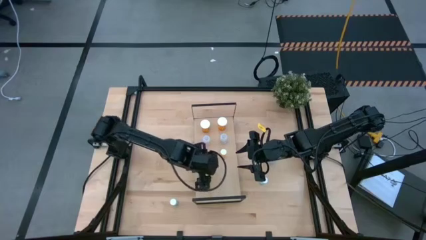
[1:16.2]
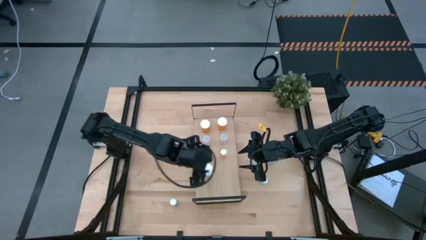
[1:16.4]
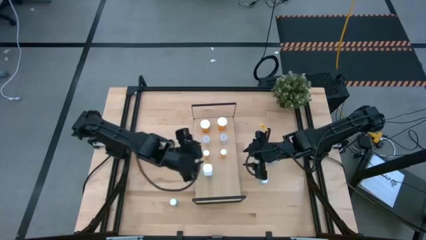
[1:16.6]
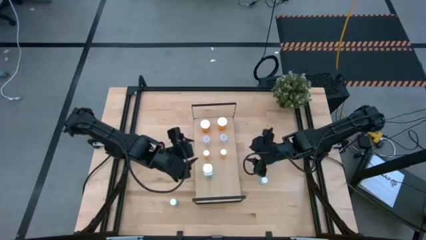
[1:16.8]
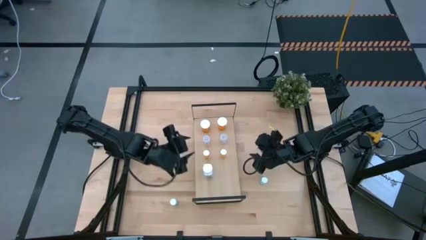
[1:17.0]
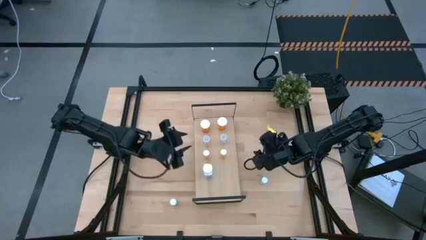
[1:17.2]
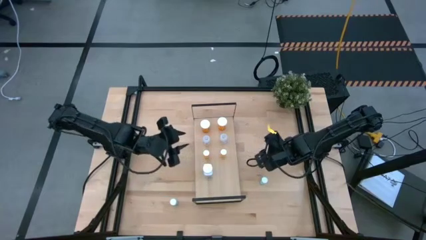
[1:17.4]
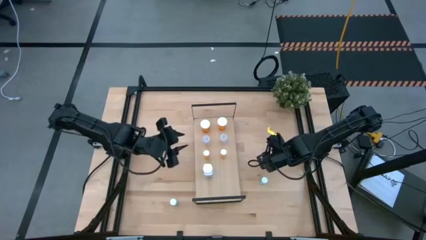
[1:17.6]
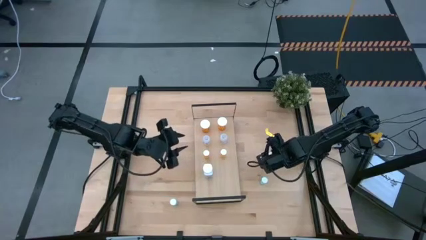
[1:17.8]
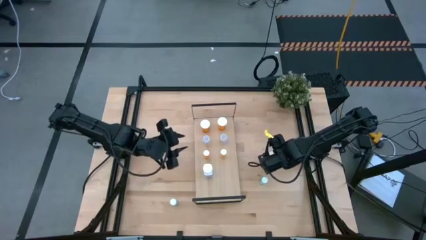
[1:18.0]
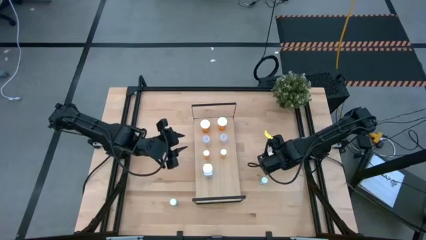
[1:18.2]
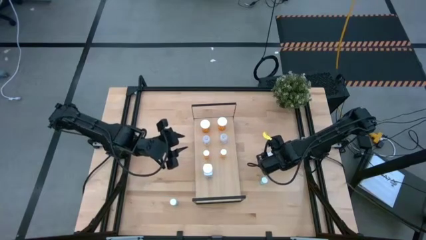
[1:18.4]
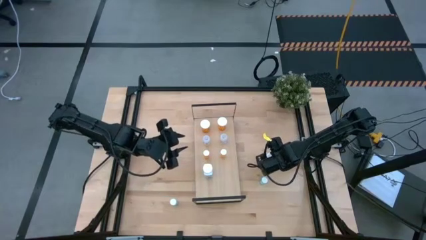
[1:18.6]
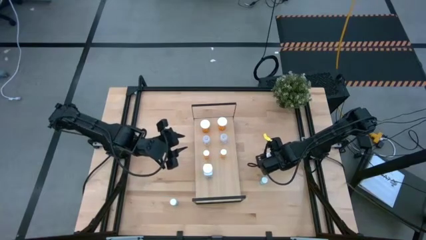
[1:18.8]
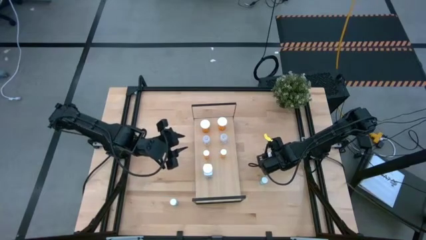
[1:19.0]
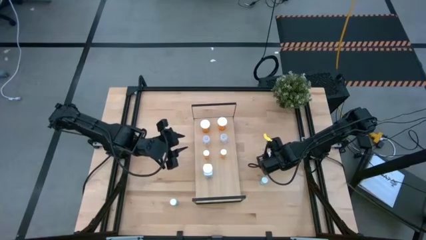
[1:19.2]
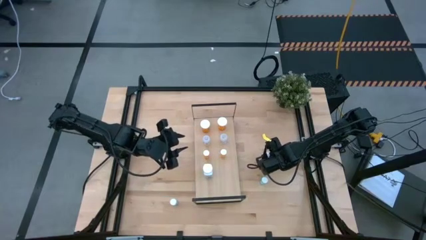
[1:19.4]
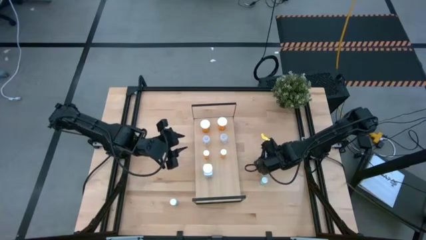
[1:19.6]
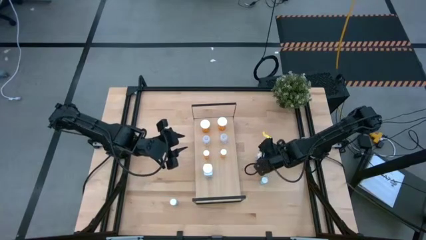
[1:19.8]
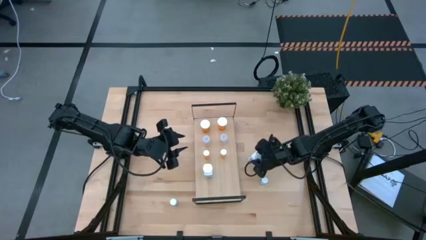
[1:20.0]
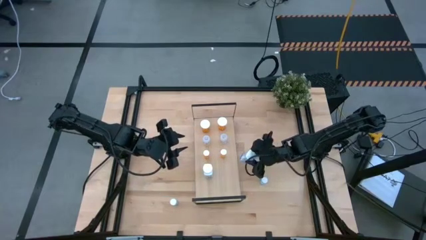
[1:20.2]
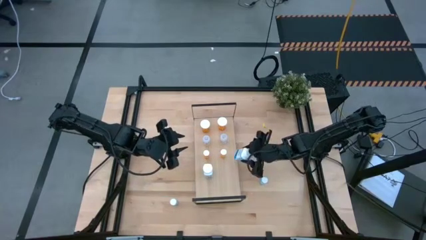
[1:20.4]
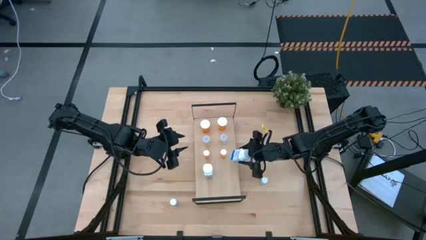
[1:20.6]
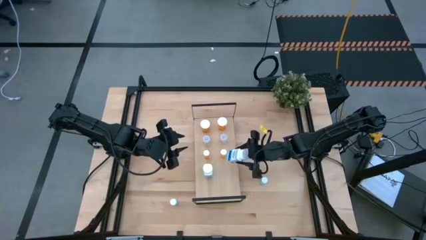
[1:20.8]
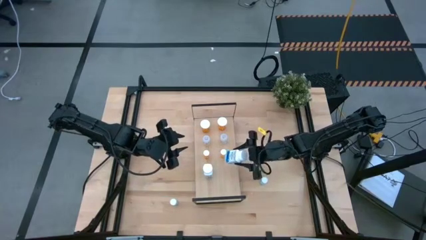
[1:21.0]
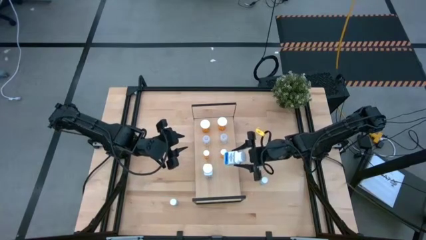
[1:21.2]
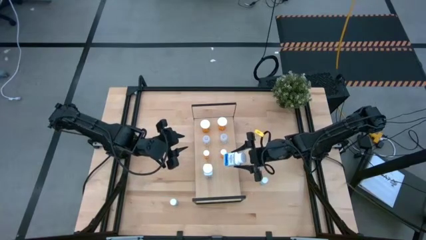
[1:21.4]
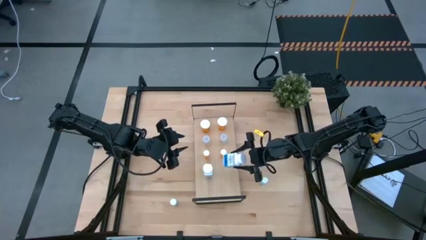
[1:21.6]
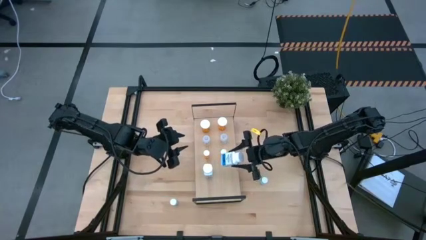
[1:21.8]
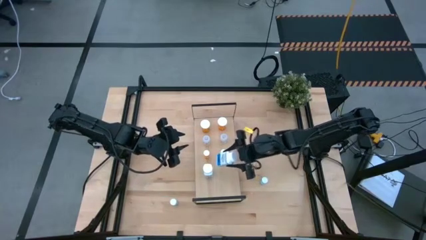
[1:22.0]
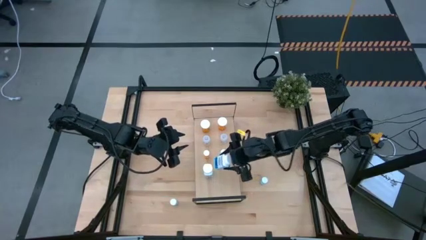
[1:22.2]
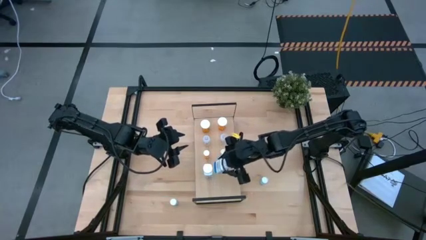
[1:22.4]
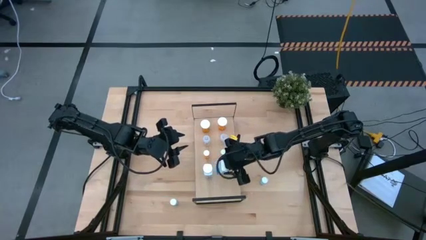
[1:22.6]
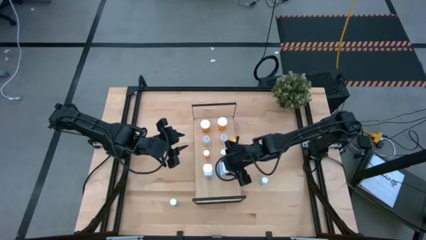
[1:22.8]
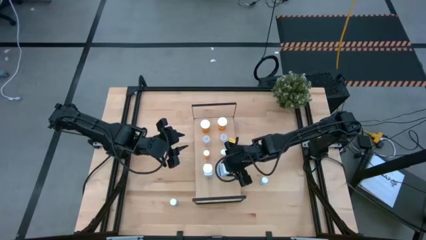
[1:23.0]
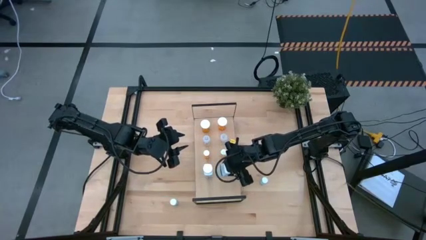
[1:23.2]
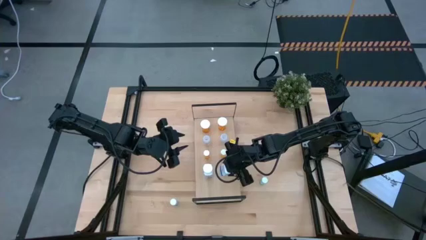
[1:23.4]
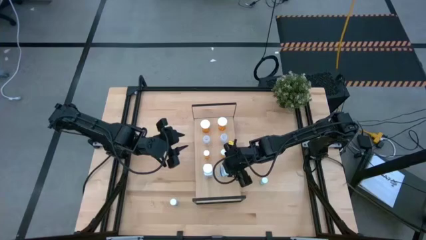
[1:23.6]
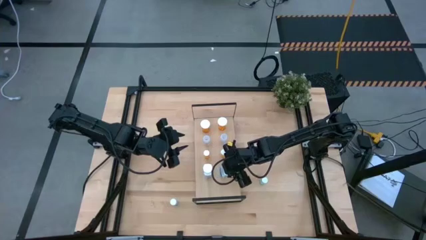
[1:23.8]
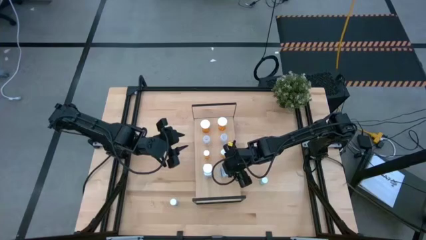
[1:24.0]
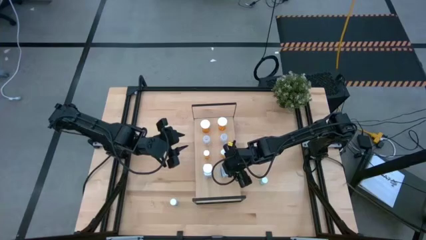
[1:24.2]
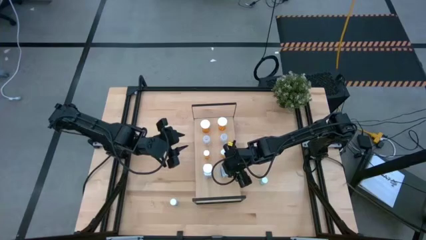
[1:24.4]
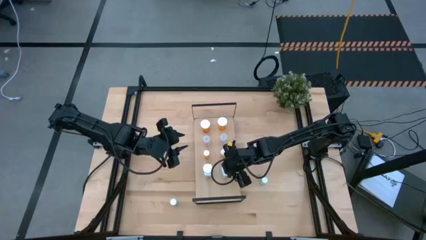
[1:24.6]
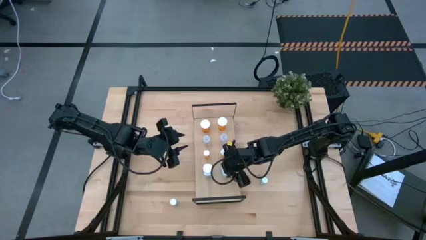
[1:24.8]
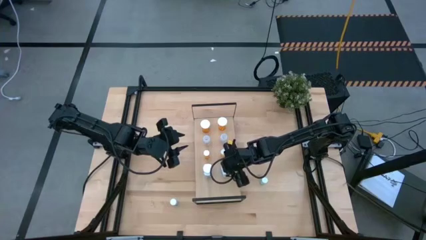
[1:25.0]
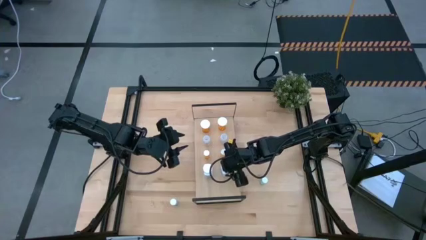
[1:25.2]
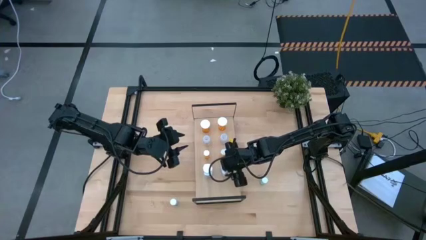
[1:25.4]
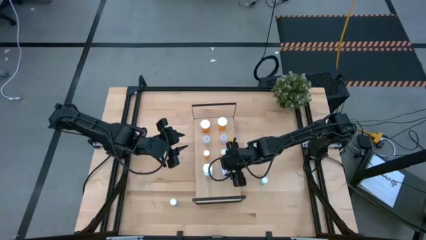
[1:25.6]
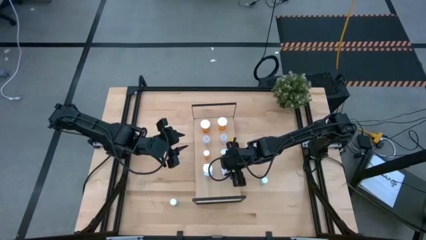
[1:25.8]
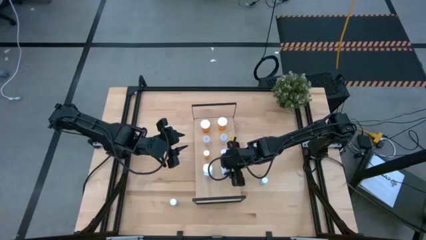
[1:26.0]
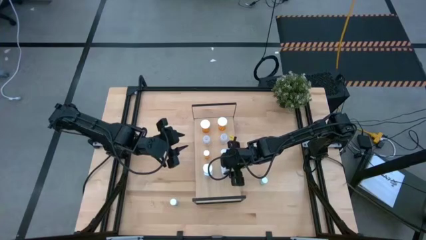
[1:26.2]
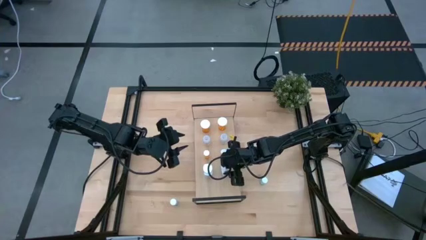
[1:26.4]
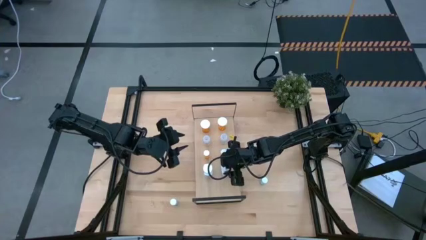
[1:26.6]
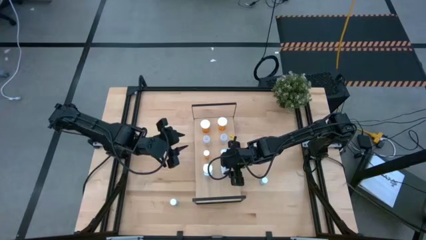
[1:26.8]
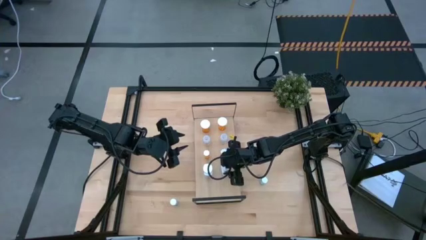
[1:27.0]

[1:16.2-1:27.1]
Task: Pick and place medicine bottles onto shelf by color
Put the white blue medicine bottle on the shelf

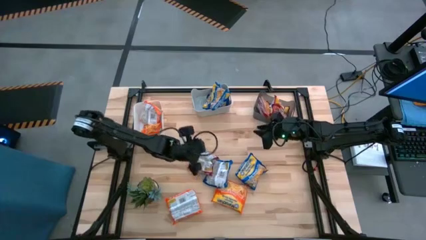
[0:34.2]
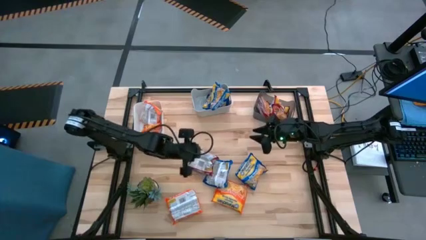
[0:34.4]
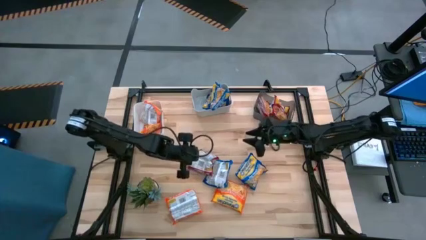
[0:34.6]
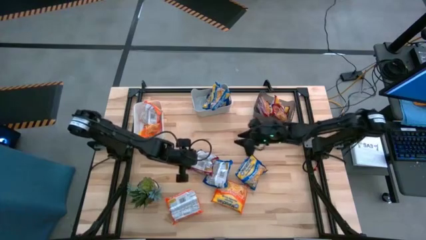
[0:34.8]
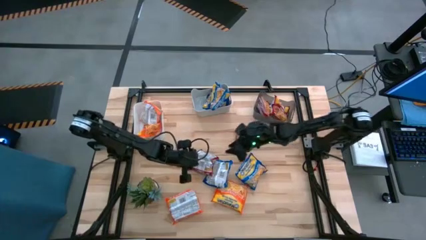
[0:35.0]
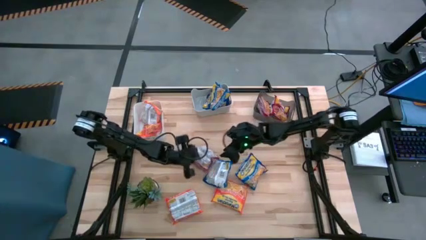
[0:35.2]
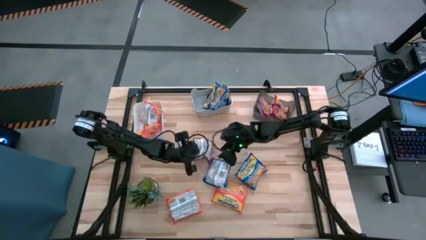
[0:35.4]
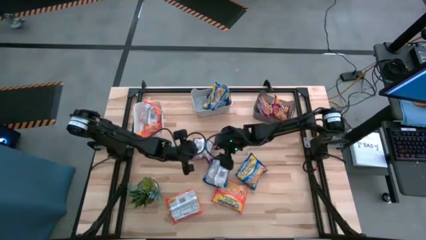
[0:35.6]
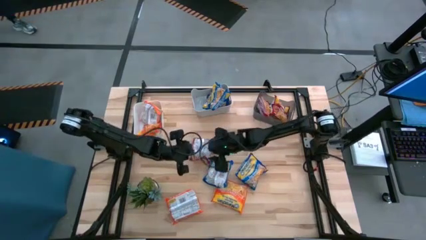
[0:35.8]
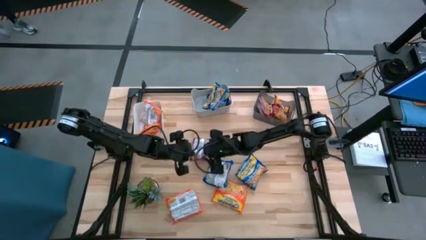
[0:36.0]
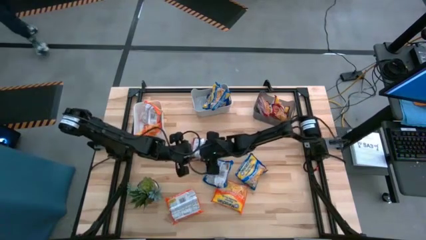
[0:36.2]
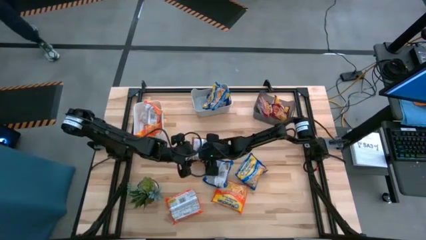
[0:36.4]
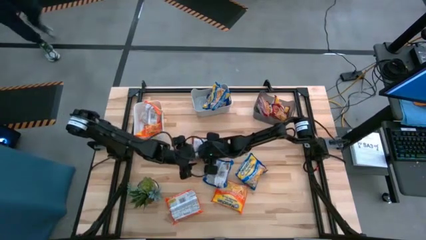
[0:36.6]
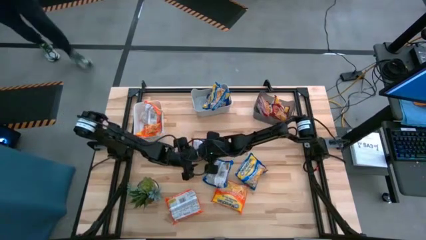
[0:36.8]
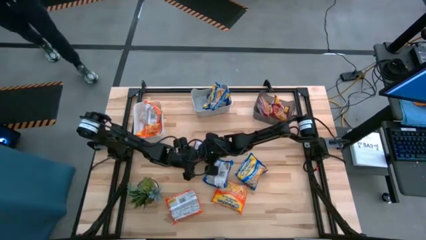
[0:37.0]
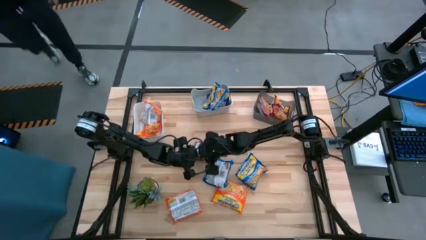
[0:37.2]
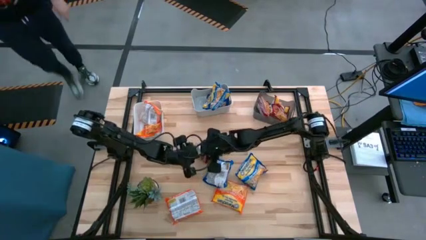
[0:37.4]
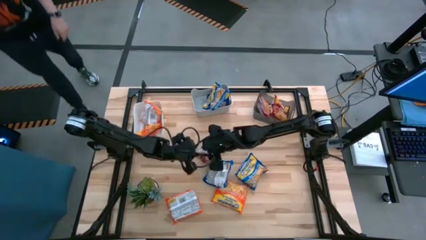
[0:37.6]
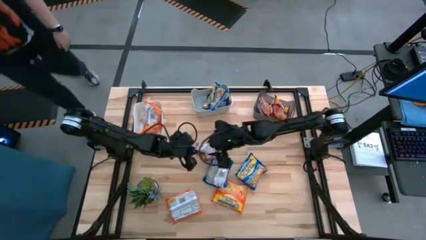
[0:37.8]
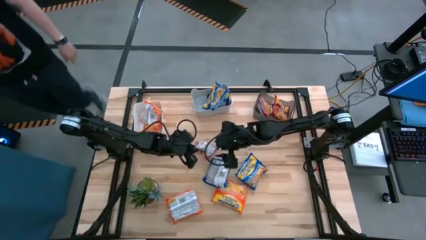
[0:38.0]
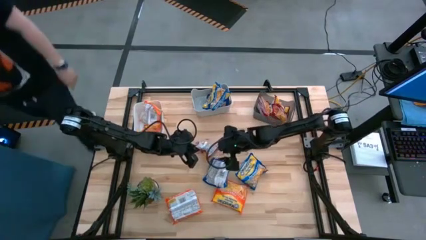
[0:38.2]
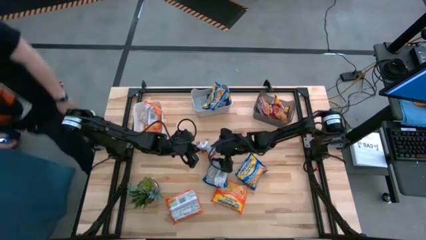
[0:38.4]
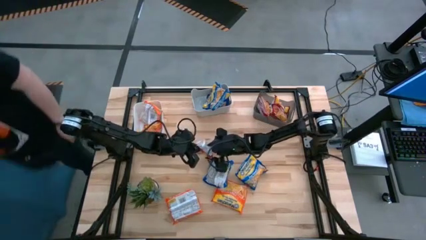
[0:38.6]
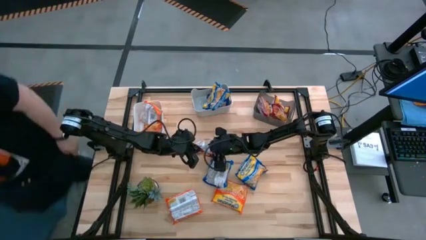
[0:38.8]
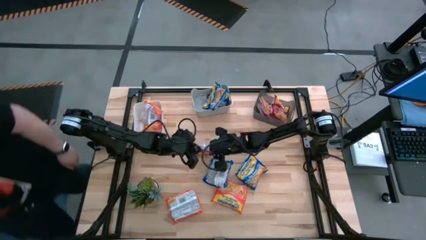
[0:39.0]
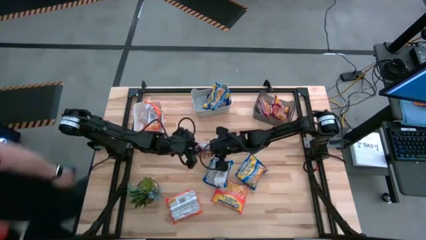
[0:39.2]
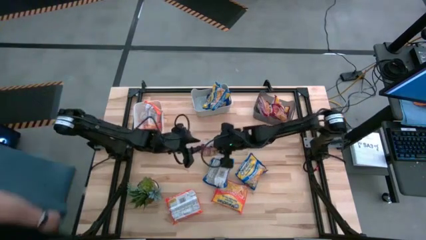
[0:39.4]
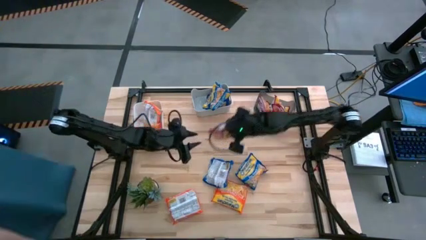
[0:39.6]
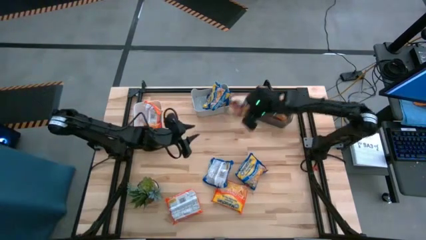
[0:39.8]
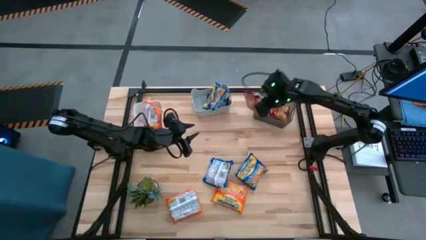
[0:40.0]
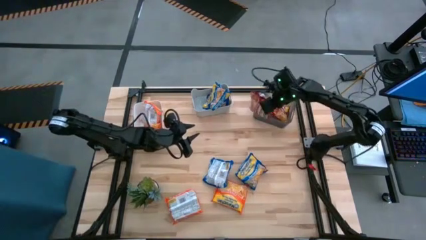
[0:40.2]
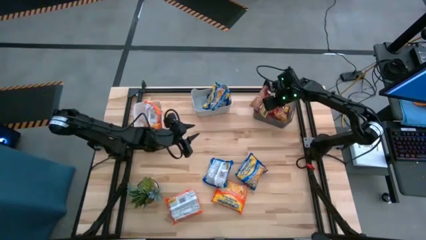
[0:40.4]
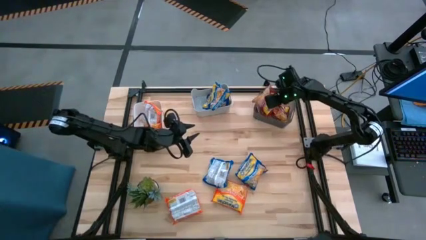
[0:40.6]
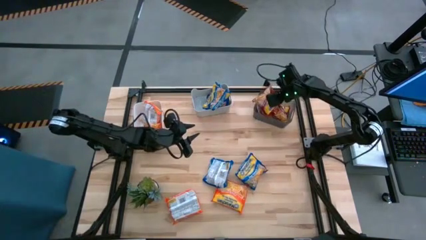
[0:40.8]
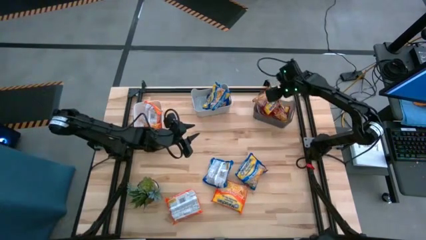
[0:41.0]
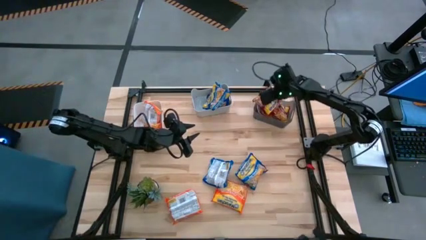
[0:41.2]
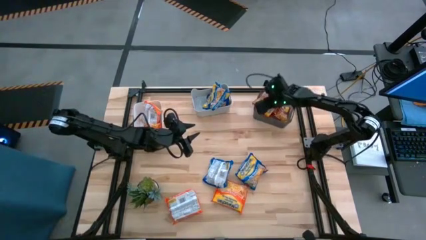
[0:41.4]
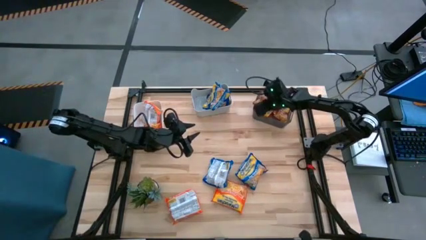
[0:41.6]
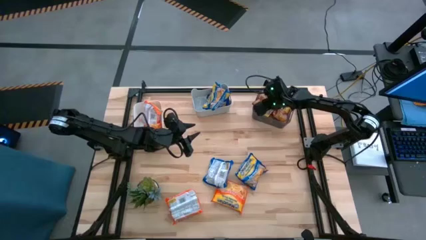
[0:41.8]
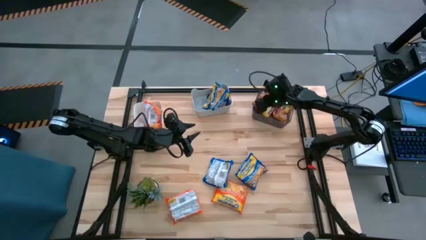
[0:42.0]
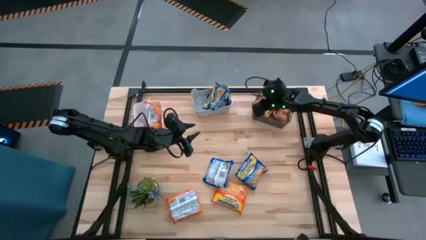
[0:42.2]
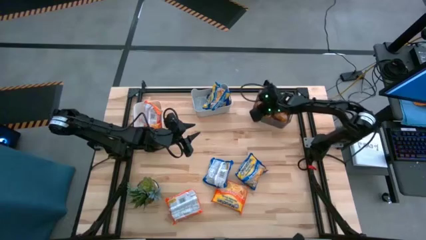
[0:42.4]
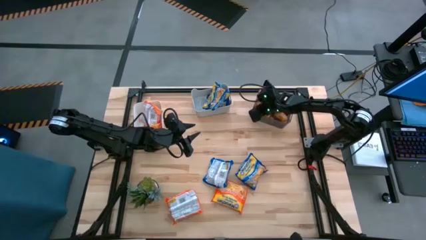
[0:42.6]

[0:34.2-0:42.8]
Task: Sort Maruchan noodles
Put the red noodle pack into the black bin
